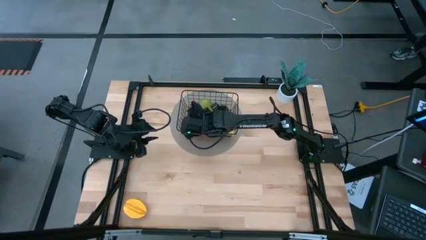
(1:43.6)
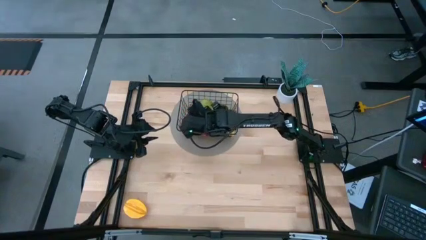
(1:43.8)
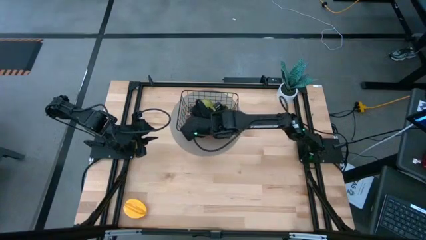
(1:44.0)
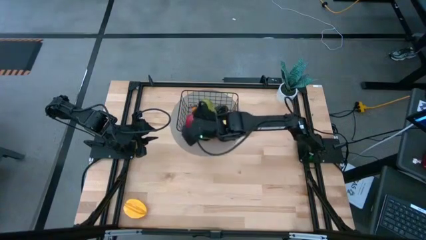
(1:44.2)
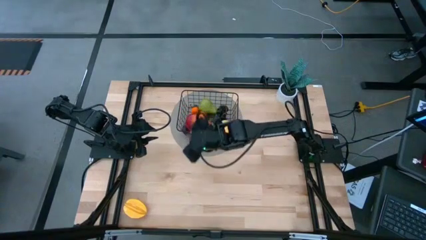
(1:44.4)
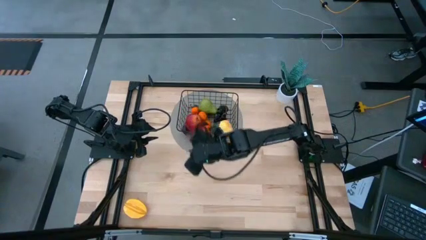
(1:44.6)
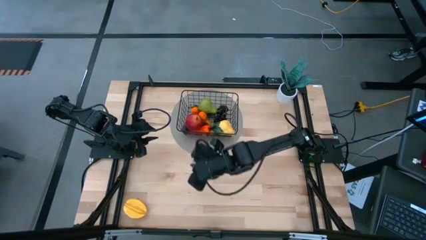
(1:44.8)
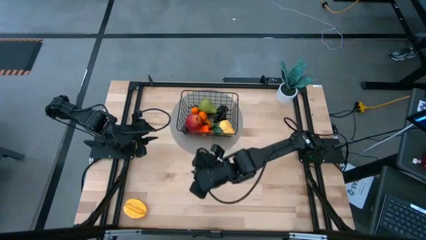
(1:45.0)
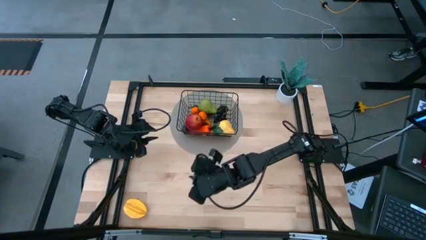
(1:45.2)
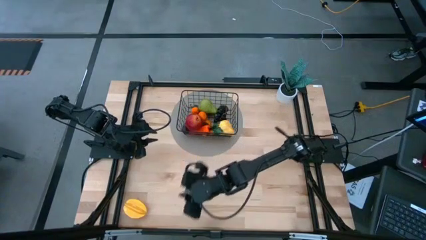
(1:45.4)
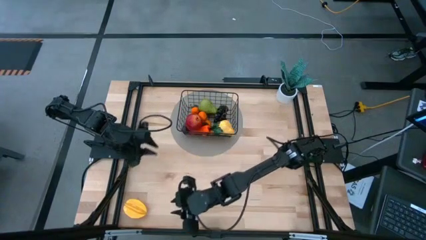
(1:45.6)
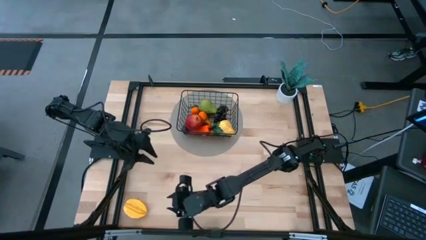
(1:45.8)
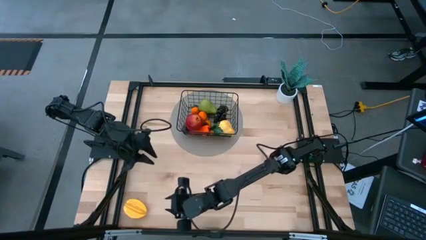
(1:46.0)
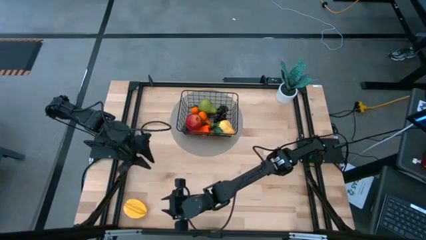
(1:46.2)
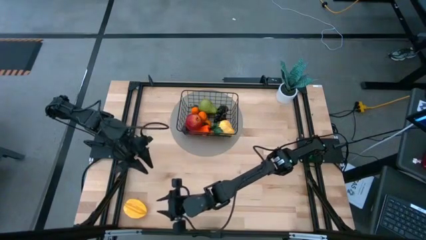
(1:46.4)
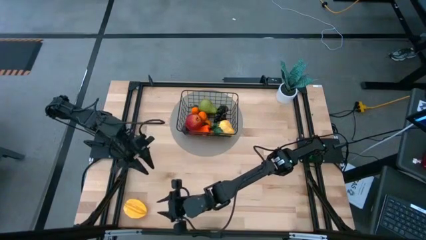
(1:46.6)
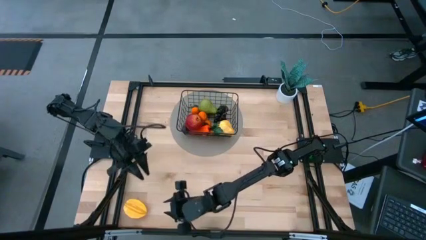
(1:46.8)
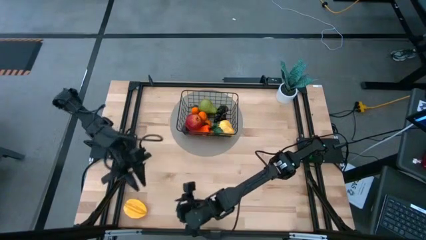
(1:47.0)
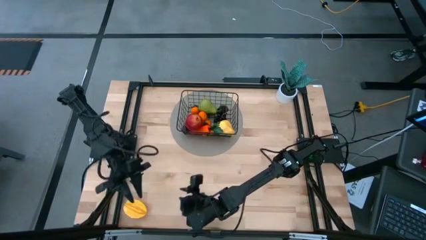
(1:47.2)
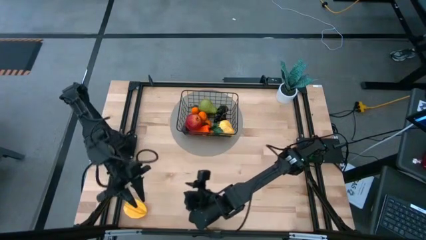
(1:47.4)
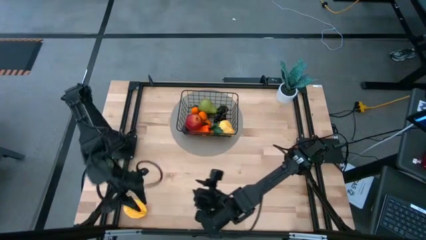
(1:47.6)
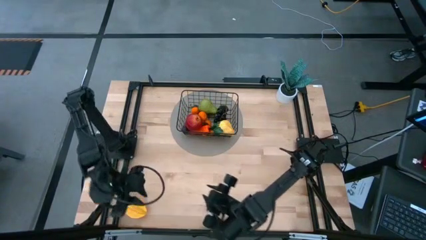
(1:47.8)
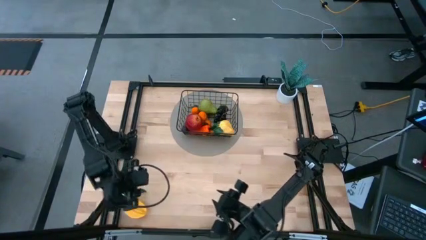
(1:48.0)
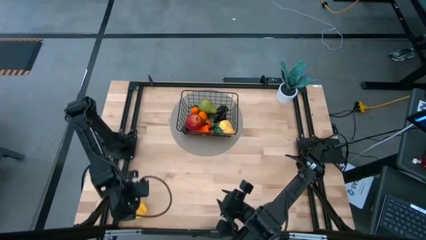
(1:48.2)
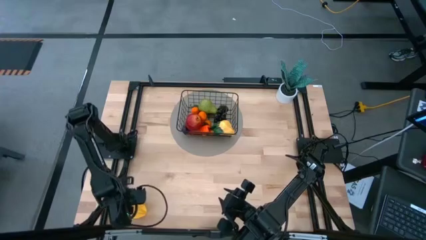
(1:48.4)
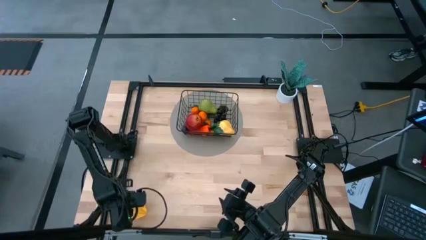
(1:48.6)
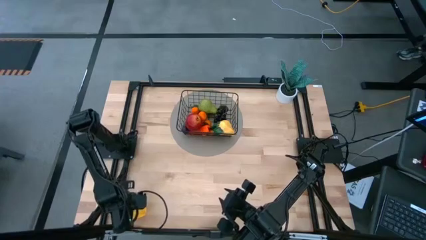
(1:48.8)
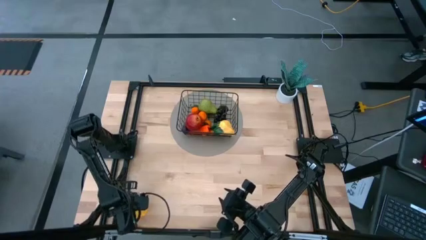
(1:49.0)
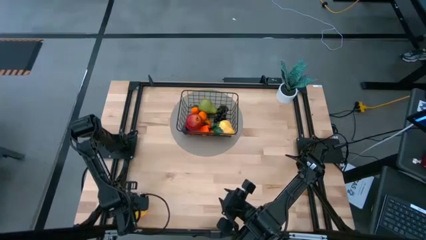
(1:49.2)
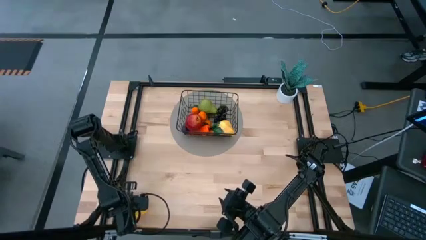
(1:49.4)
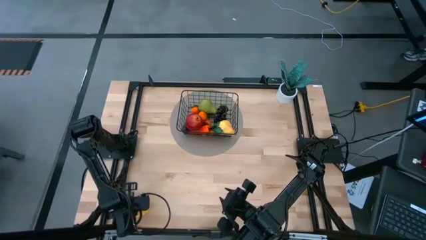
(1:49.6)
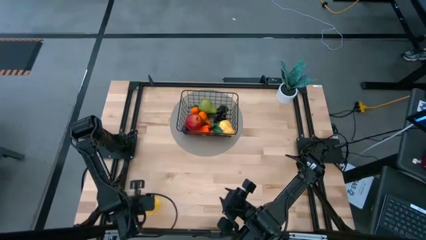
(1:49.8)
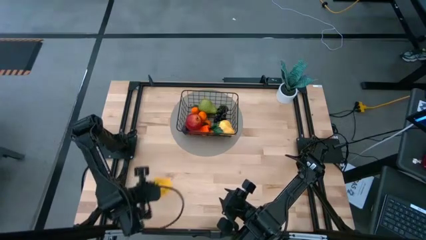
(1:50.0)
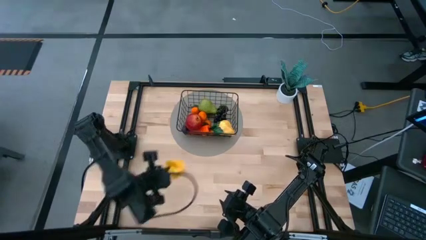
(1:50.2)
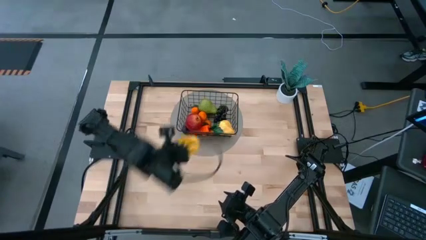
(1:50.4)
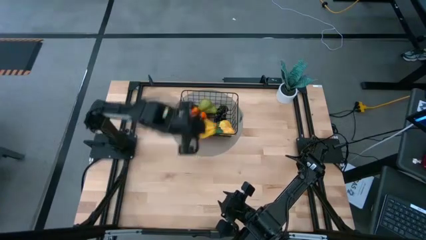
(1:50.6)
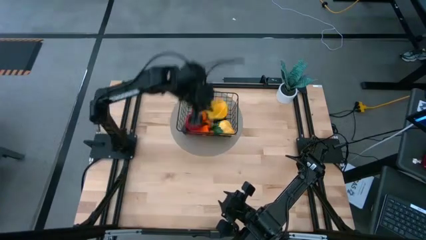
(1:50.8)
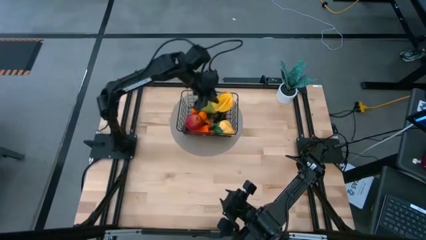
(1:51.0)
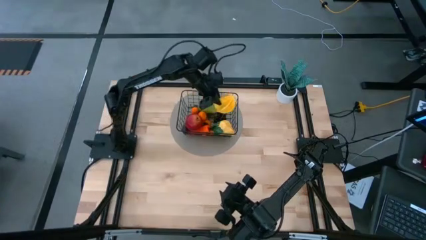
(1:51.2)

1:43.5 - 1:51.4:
Task: Build produce basket
Put the yellow star fruit into the black wire basket

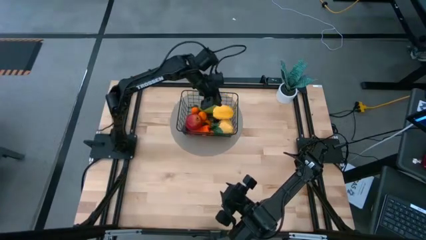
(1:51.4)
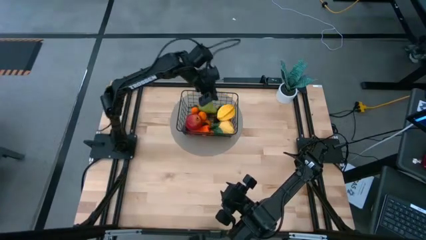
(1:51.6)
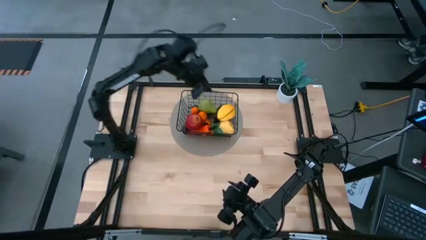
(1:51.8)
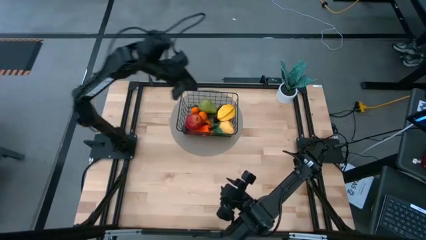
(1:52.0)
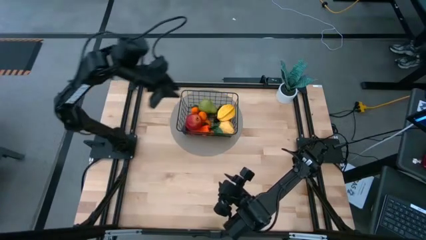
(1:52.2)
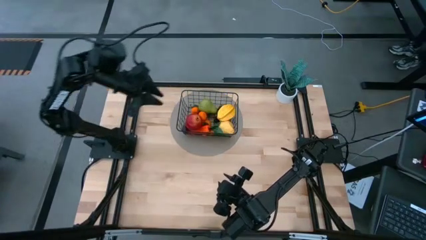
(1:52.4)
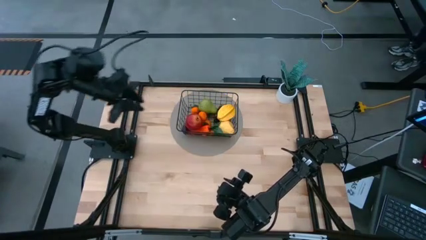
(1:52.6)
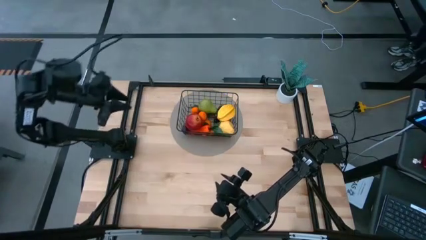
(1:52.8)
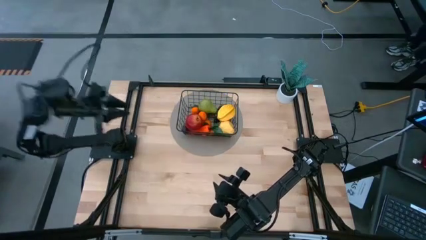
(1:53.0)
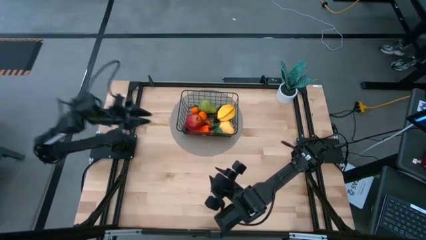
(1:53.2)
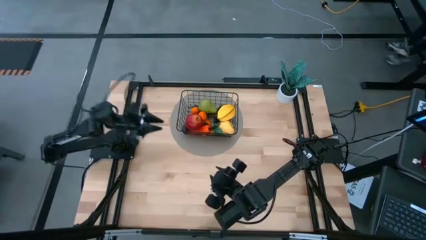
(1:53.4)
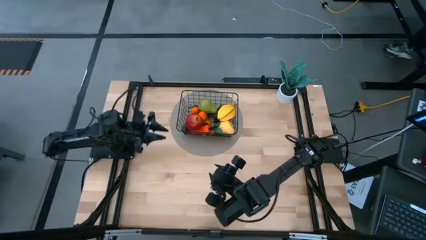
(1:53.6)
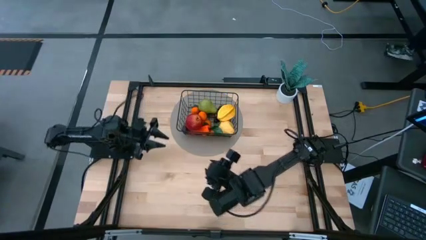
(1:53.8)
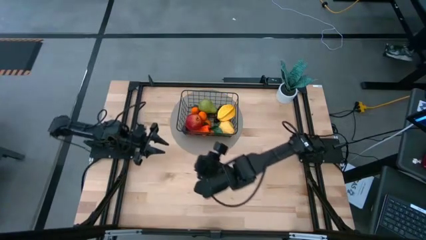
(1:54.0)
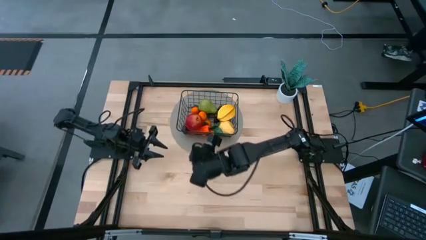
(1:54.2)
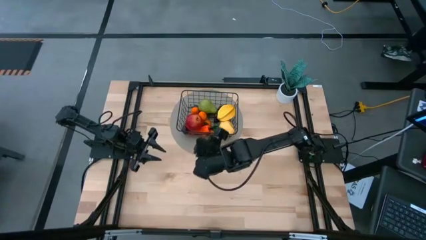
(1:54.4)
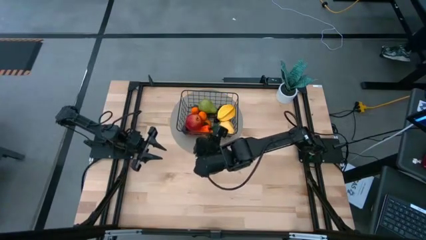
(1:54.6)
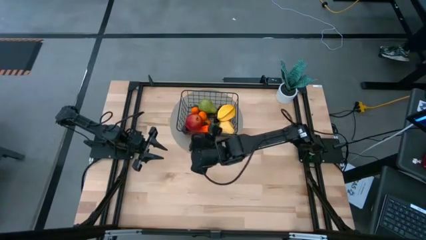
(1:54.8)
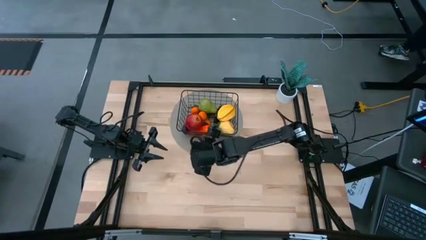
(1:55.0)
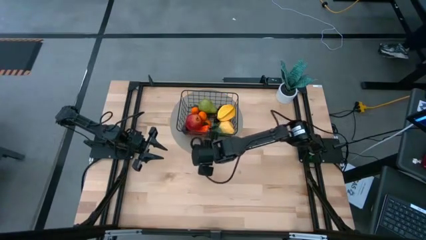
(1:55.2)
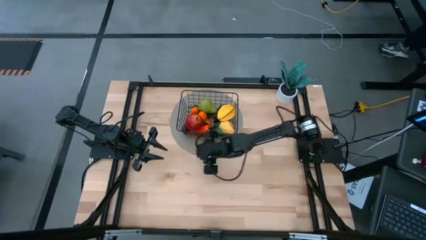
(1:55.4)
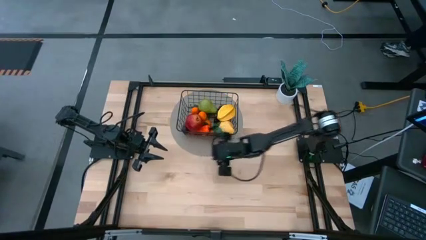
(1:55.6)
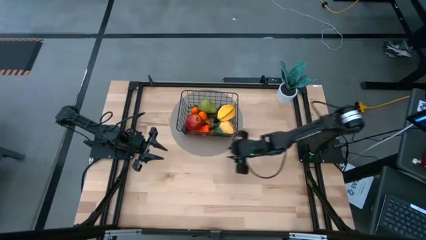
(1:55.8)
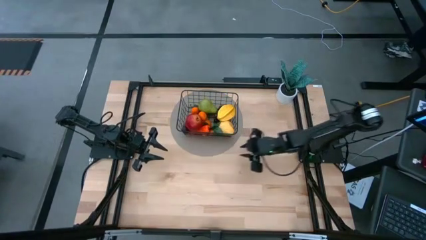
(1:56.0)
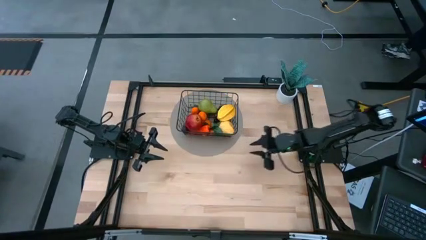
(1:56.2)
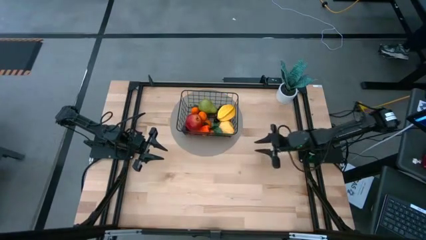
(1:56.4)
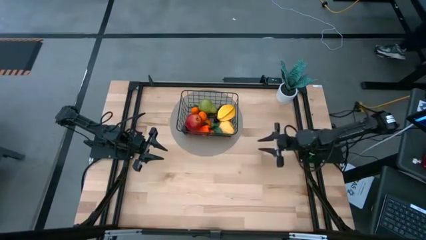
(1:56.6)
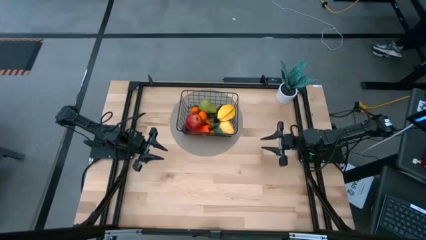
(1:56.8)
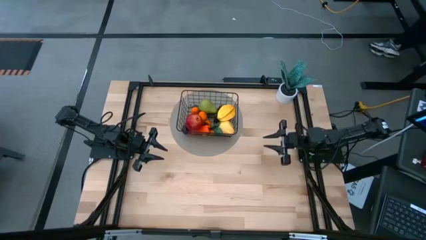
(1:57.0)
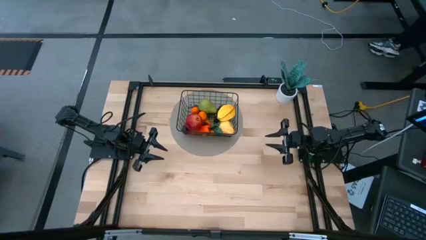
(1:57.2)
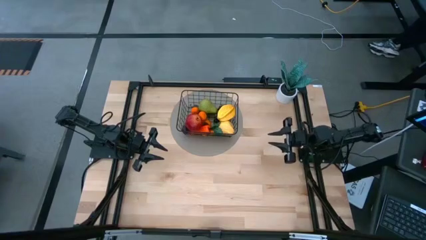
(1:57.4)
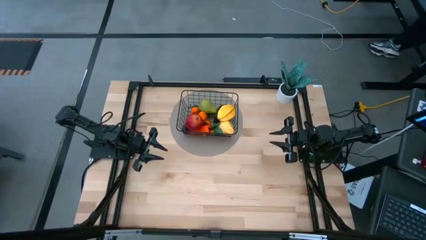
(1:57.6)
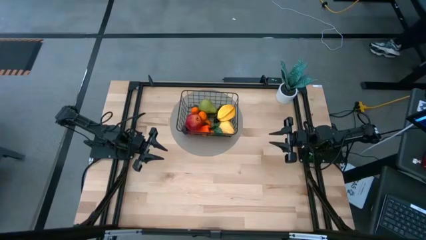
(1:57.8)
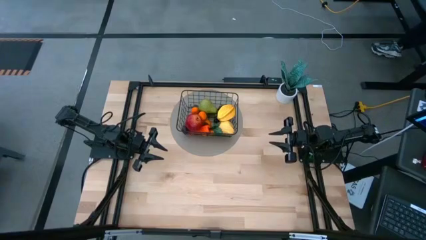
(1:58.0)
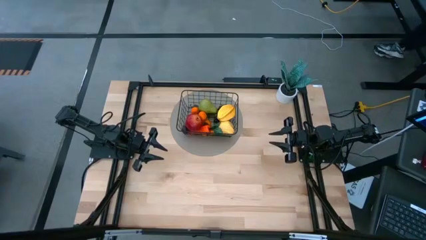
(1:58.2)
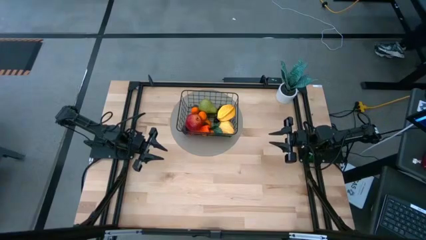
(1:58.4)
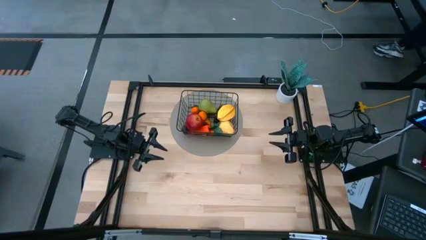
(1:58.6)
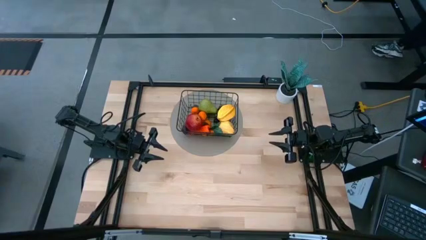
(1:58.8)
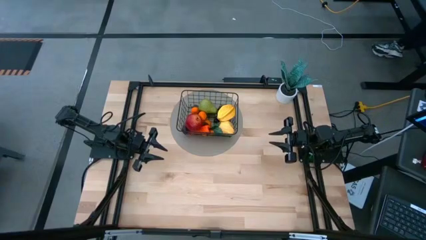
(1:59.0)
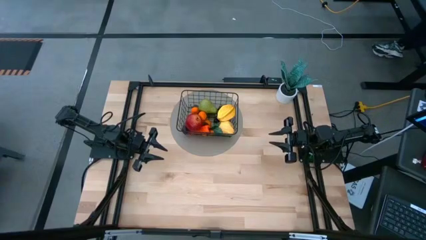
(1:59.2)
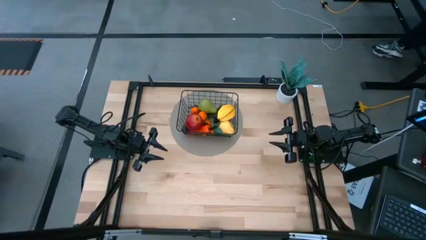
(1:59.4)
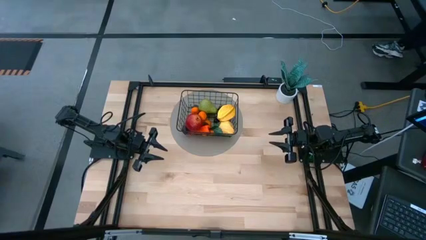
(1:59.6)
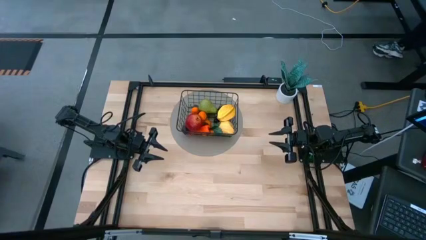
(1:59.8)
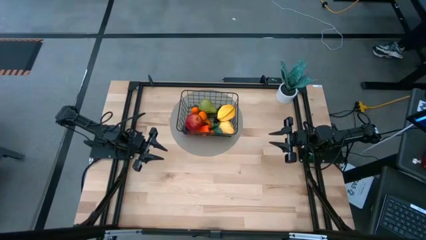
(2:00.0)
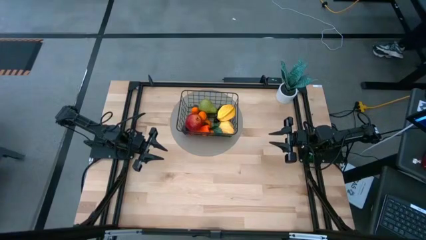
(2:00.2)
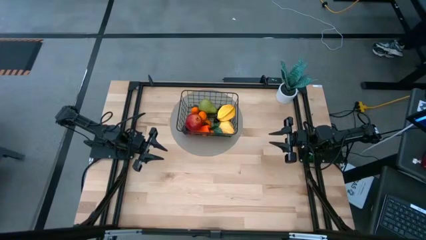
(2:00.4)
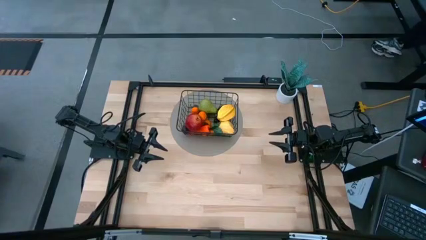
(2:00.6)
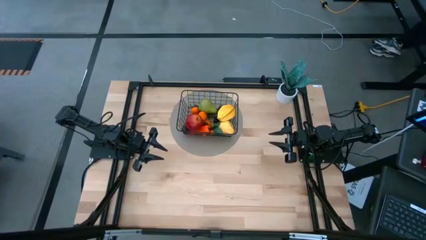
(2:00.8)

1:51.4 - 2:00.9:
Return to Home Position
